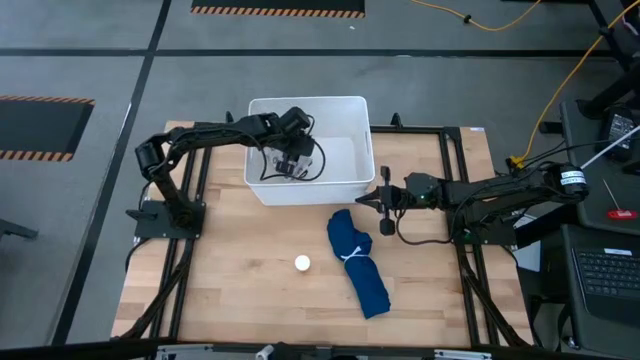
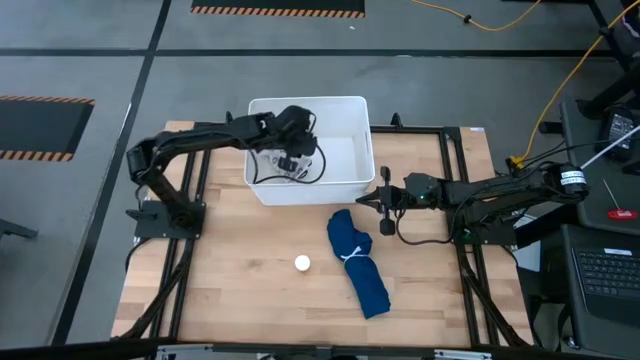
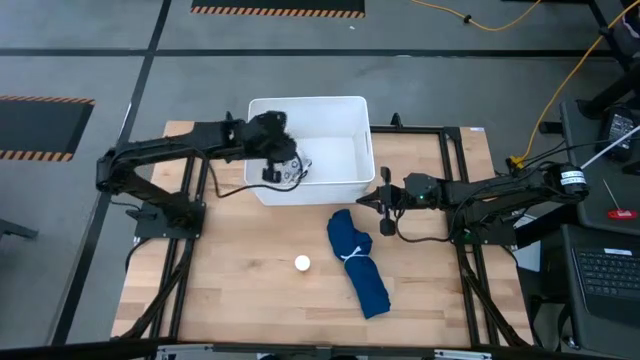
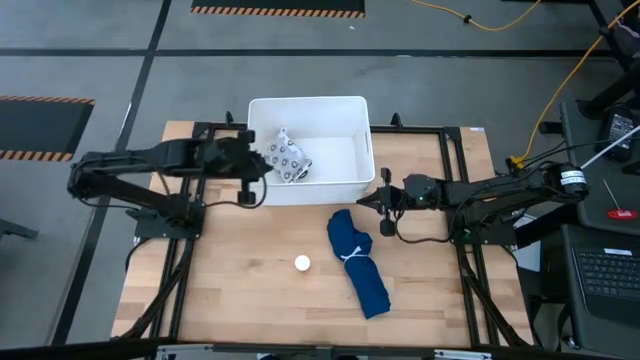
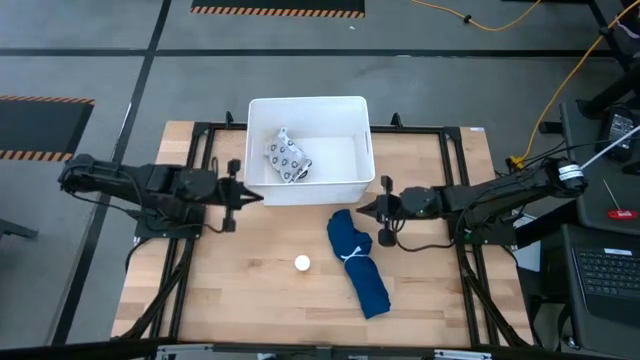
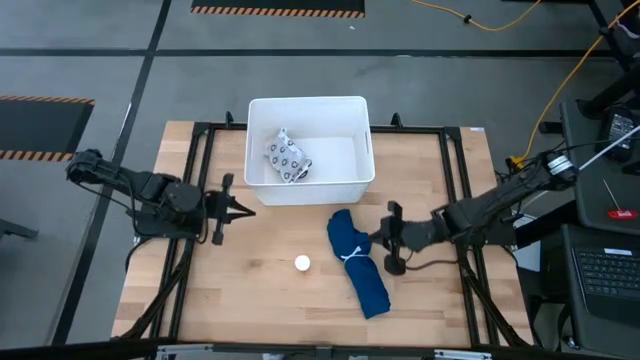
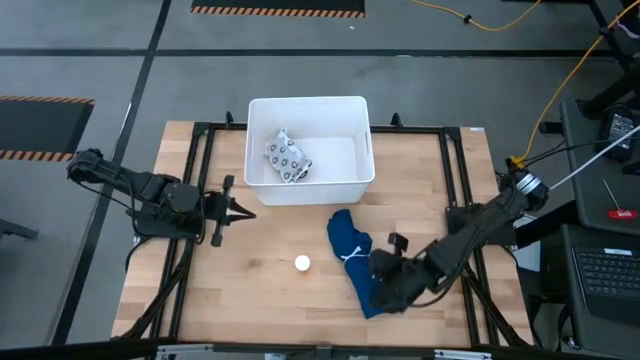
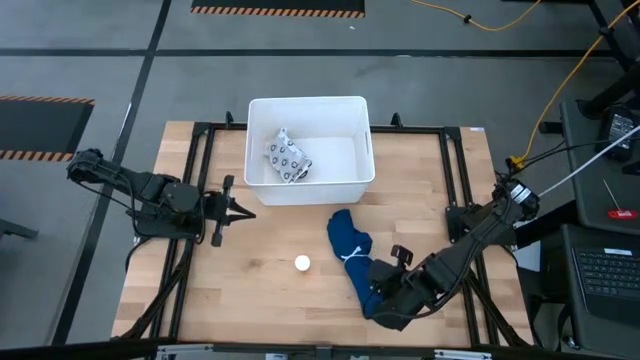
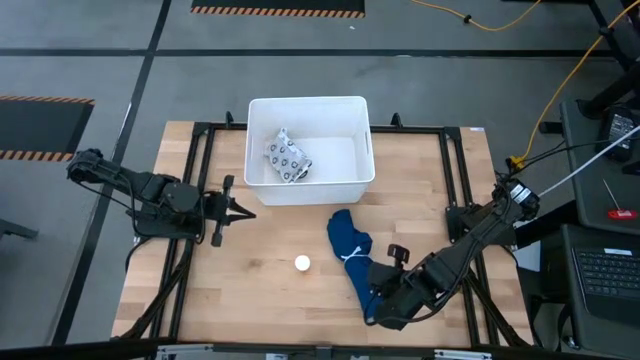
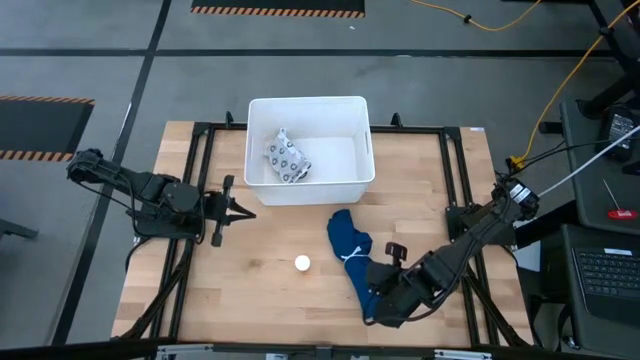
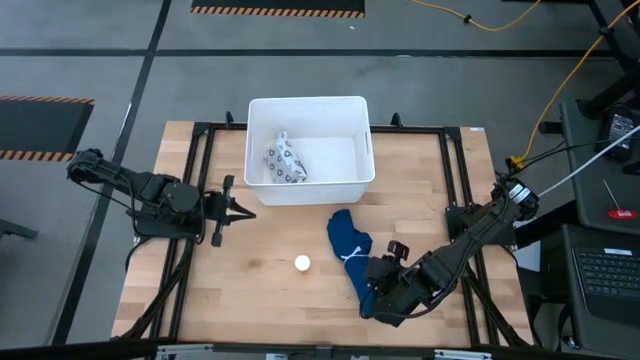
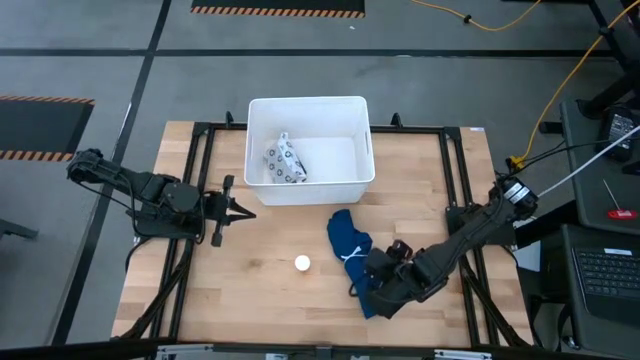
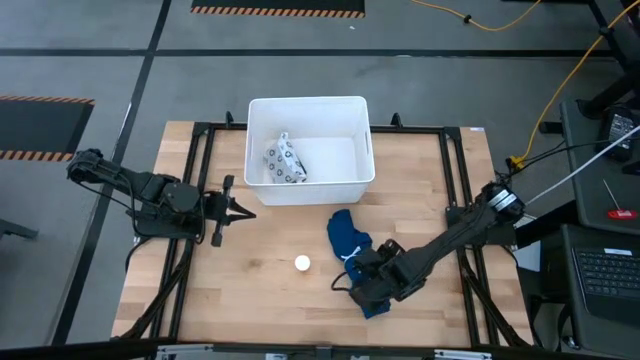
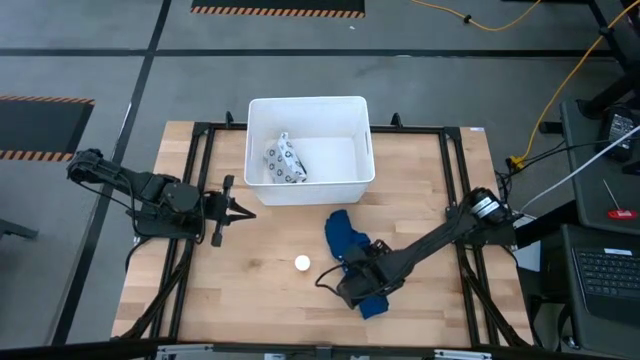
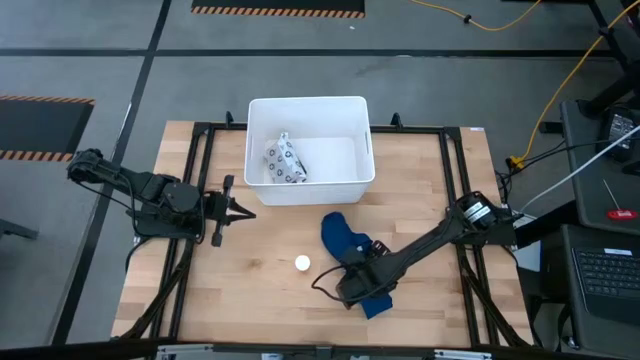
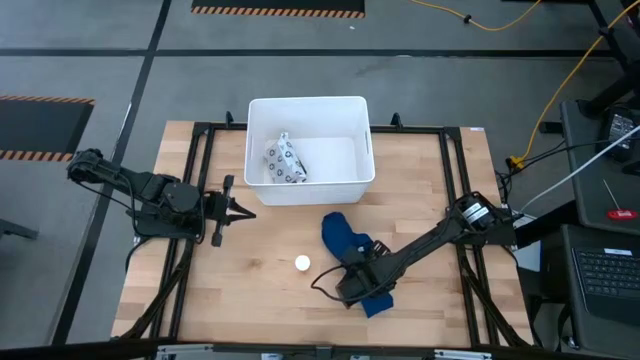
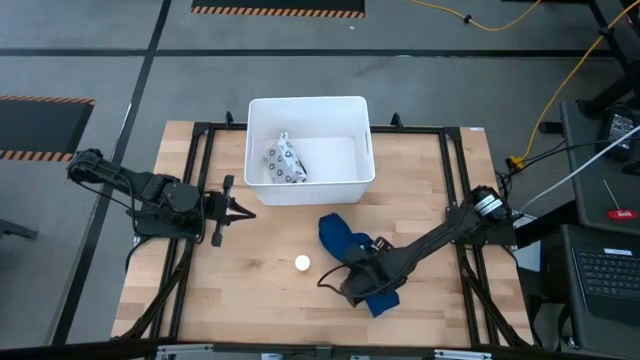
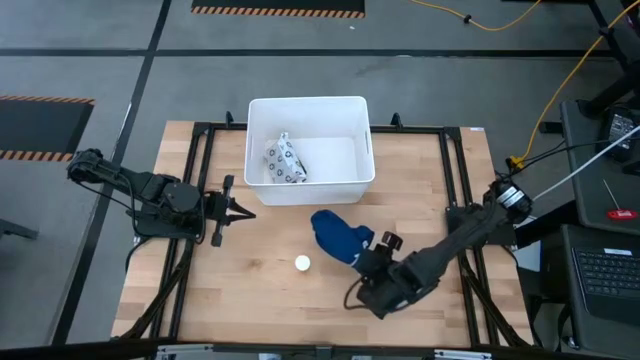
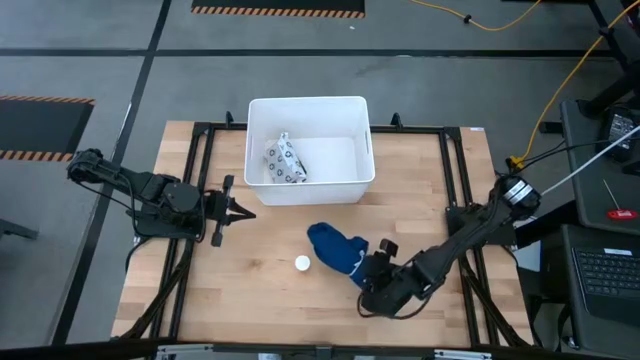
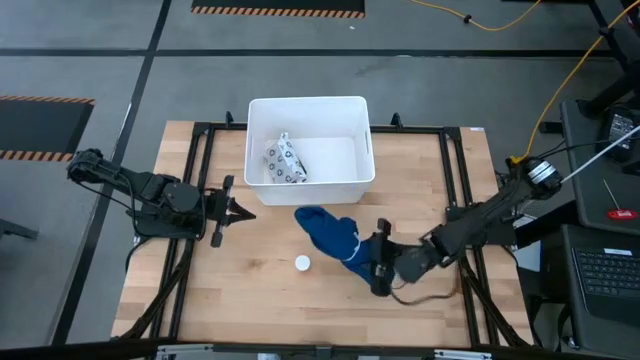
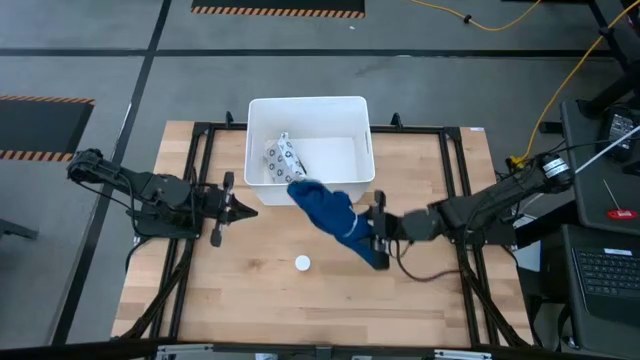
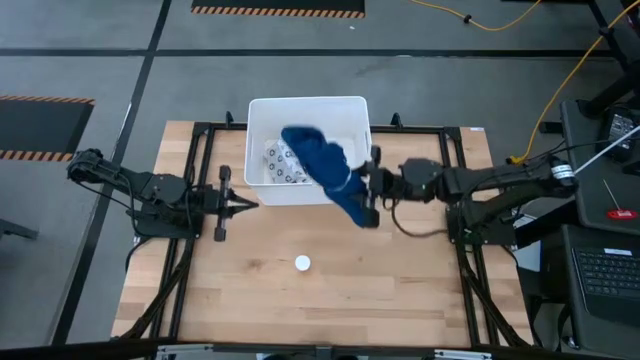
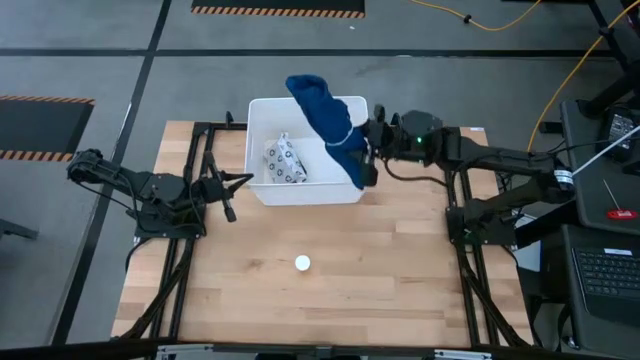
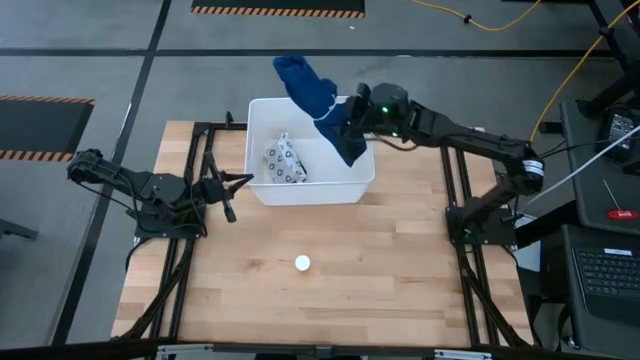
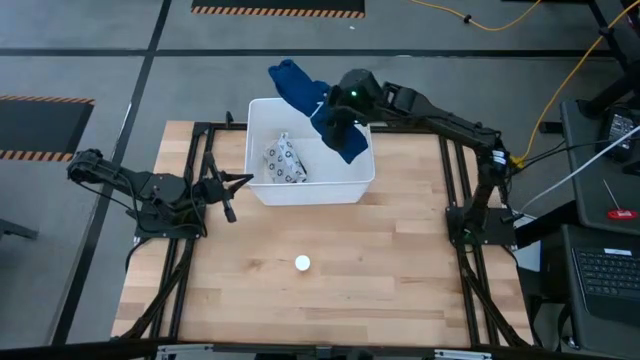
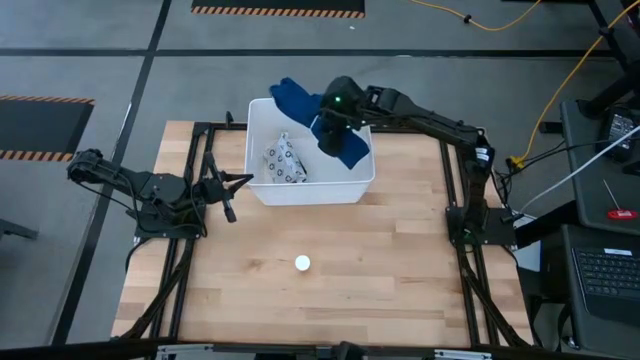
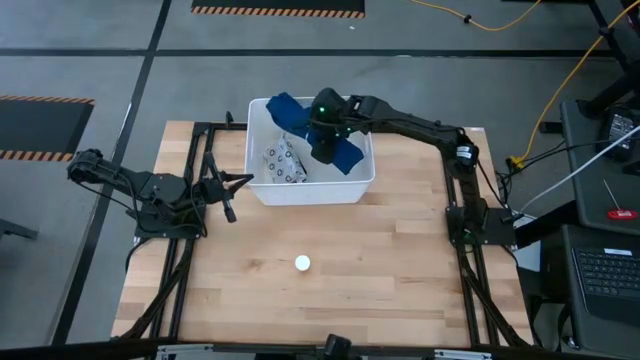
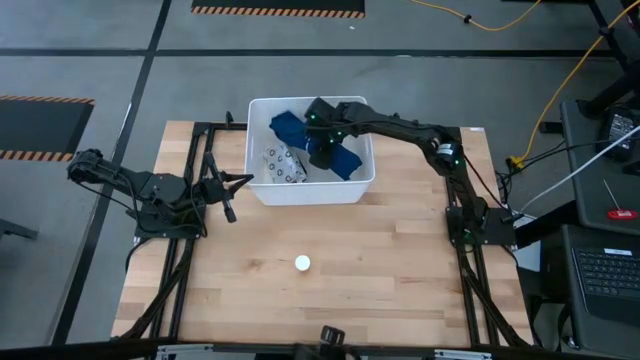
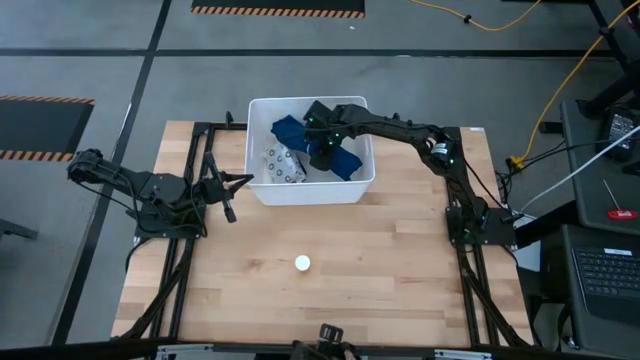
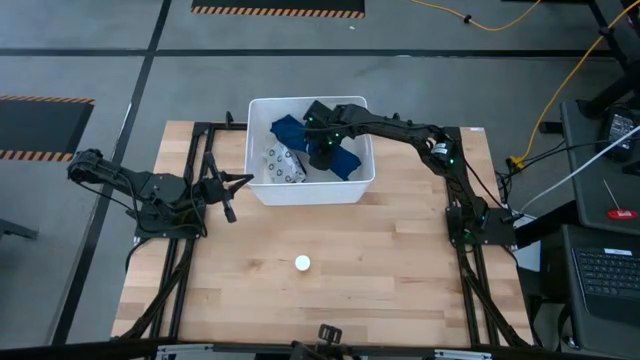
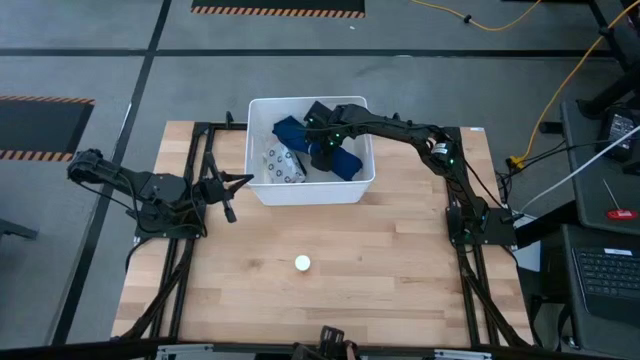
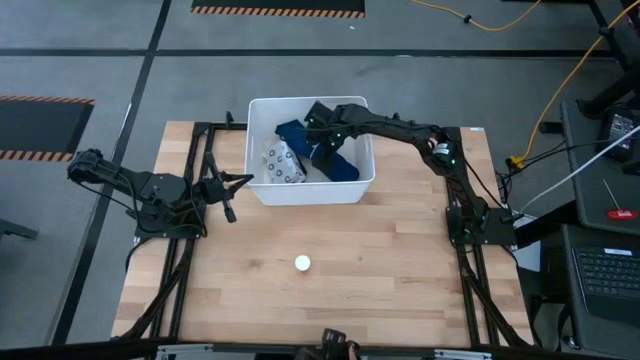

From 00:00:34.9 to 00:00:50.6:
Task: Pick & place medical supplies in basket/bin
Put the blue patient gown into the white bin

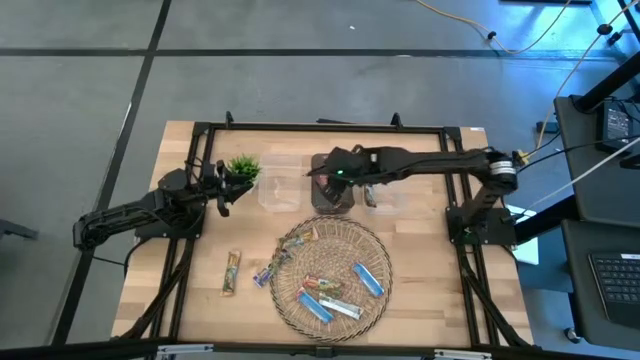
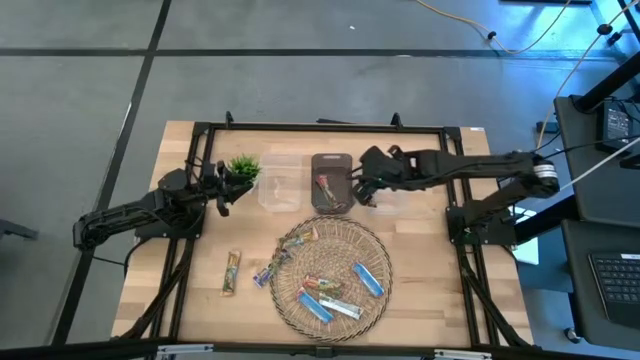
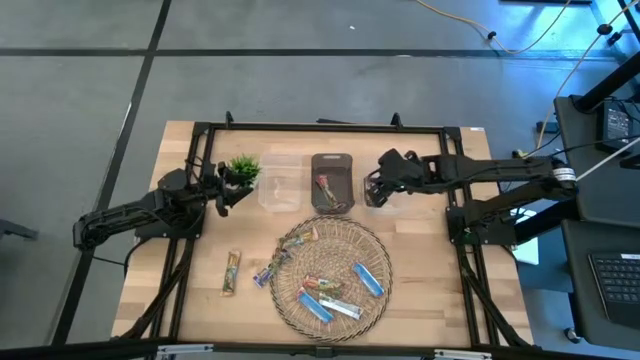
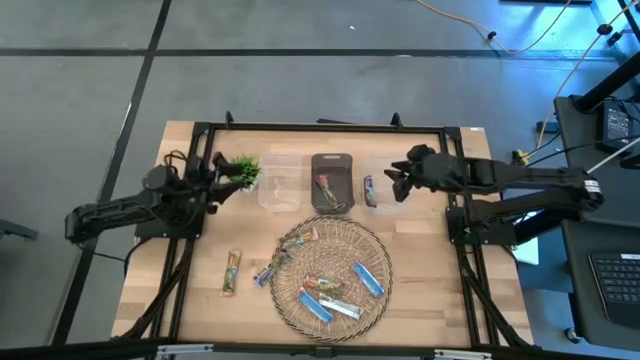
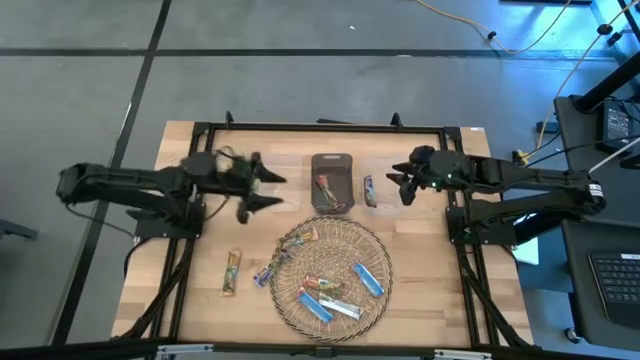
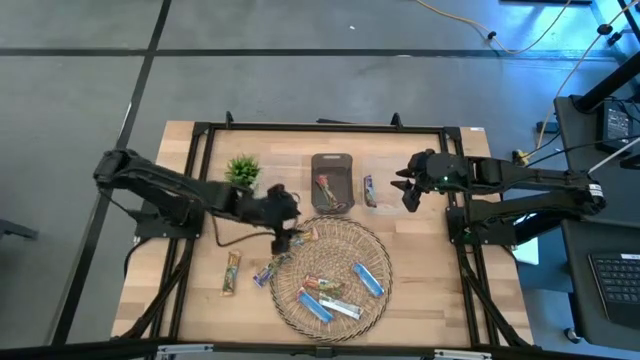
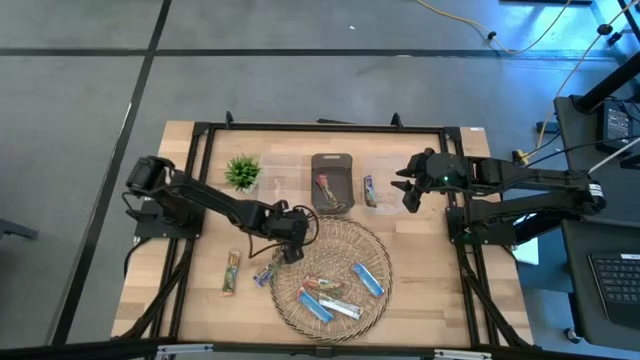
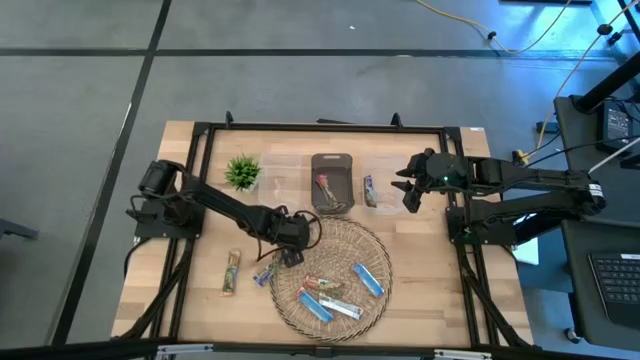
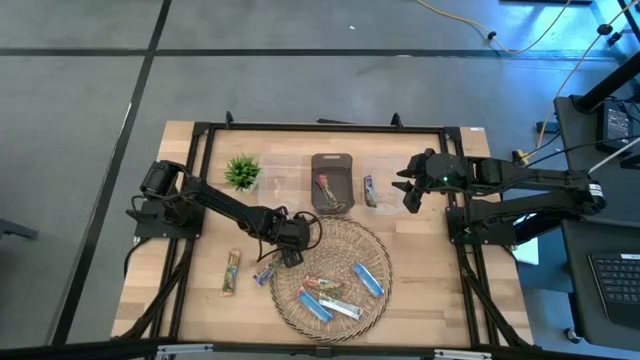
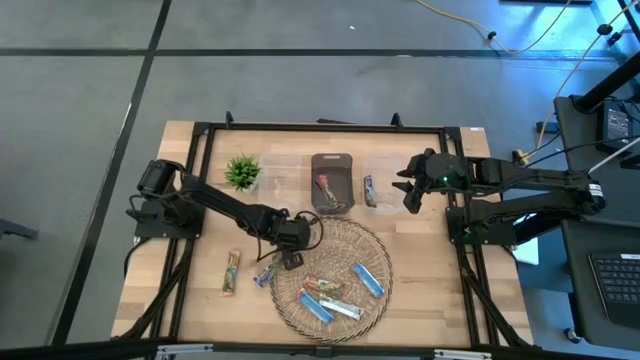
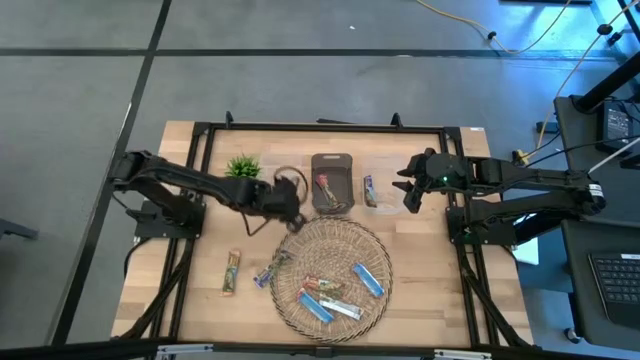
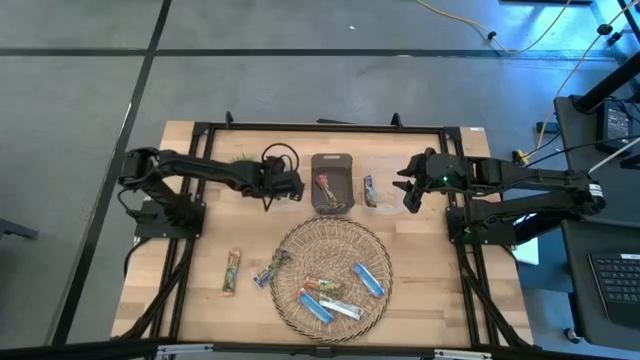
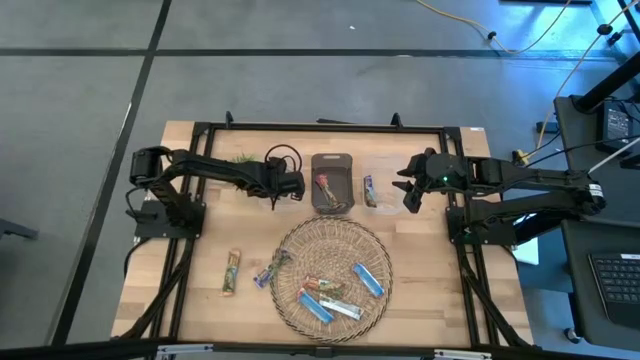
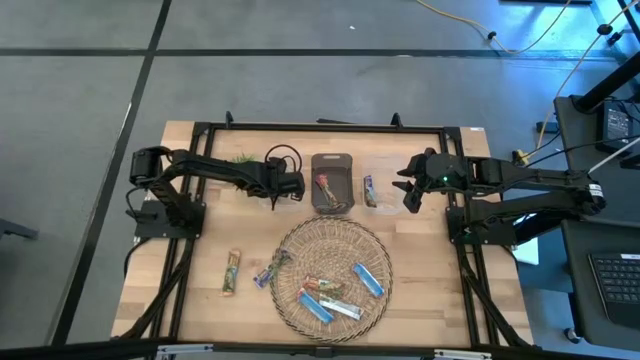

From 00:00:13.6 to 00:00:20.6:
Task: Pick and place Granola Bars by type
Put the orange granola bar into the left transparent bin
